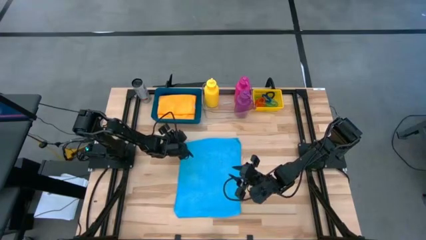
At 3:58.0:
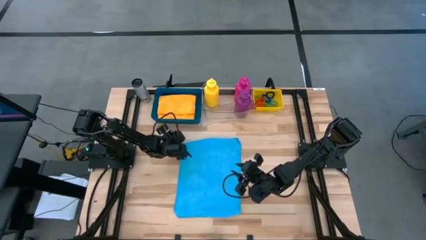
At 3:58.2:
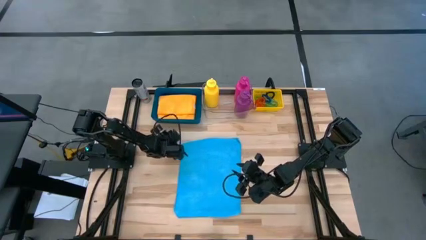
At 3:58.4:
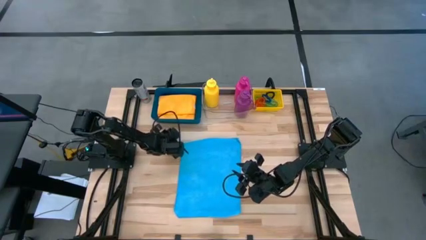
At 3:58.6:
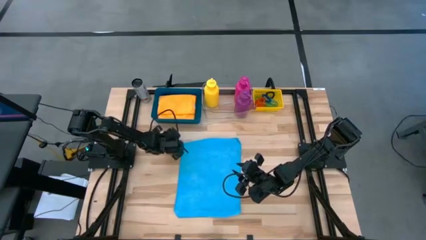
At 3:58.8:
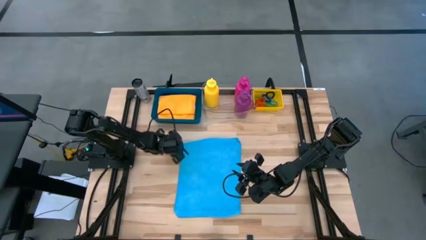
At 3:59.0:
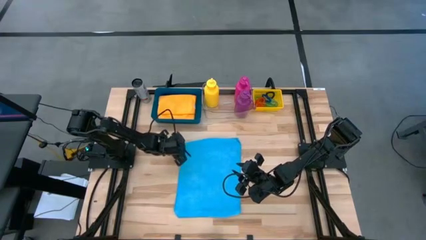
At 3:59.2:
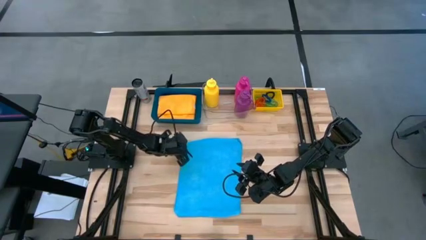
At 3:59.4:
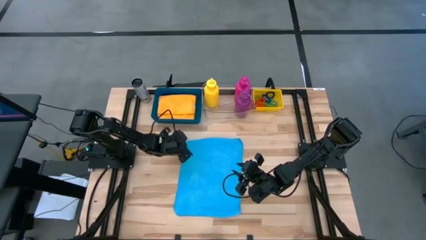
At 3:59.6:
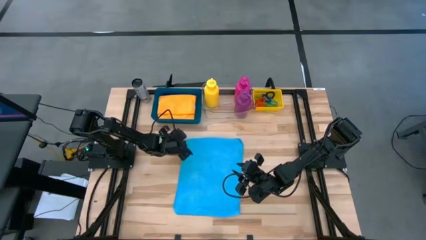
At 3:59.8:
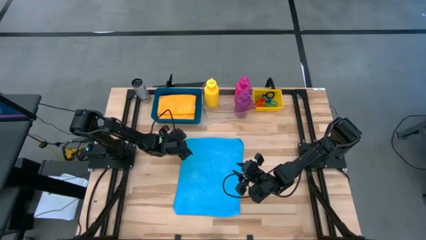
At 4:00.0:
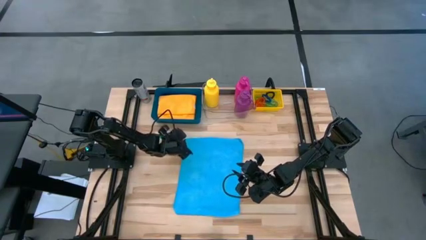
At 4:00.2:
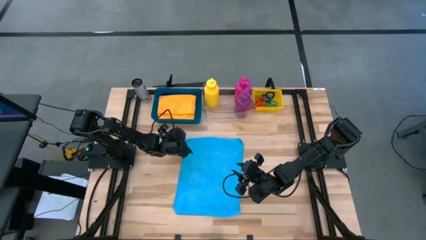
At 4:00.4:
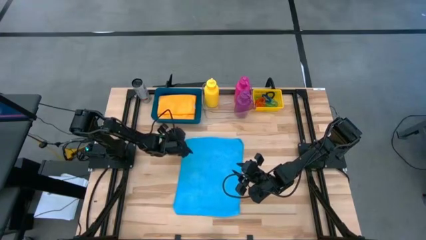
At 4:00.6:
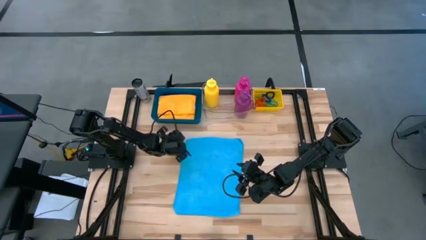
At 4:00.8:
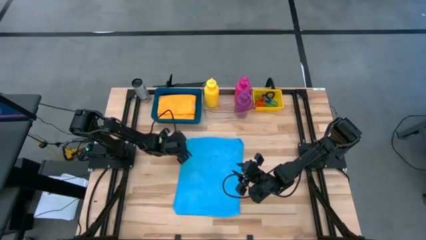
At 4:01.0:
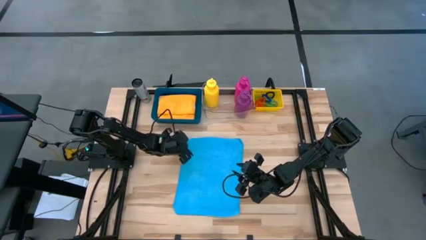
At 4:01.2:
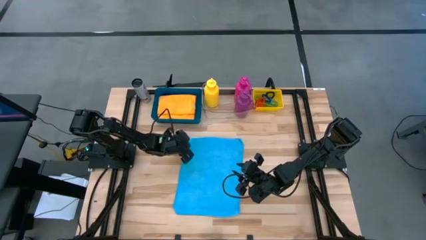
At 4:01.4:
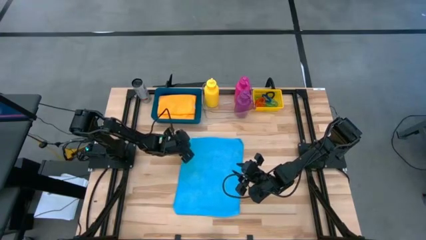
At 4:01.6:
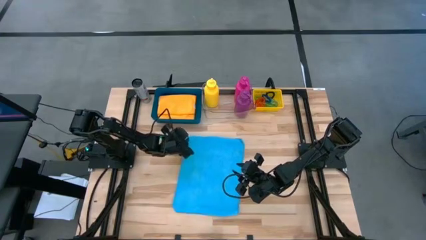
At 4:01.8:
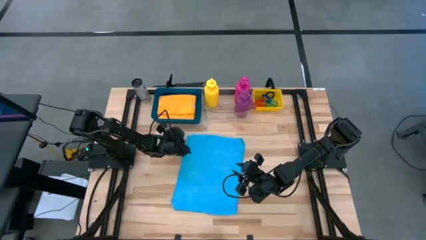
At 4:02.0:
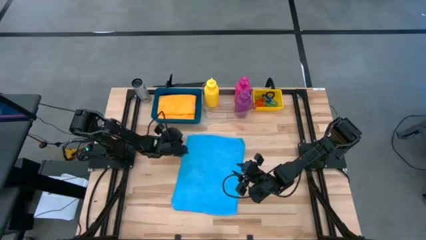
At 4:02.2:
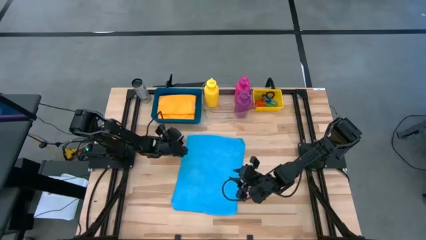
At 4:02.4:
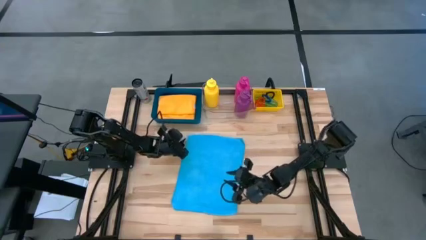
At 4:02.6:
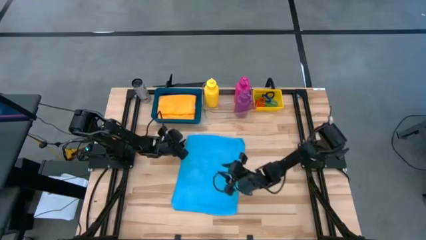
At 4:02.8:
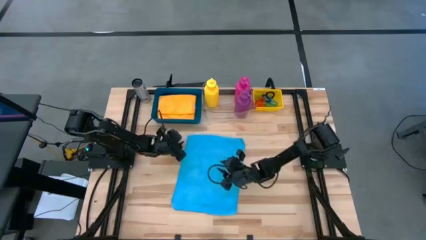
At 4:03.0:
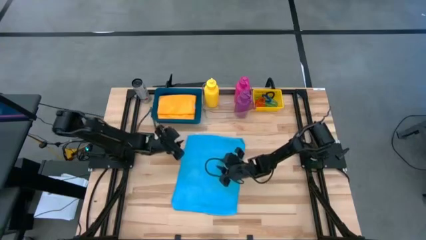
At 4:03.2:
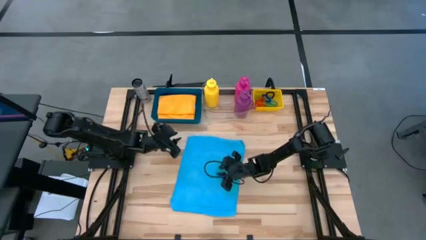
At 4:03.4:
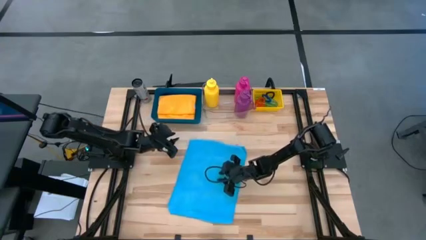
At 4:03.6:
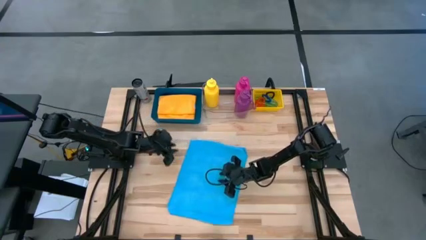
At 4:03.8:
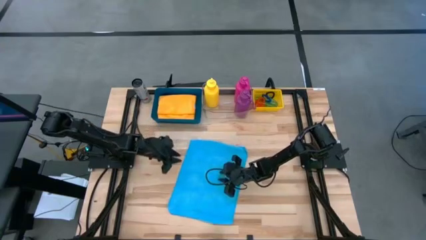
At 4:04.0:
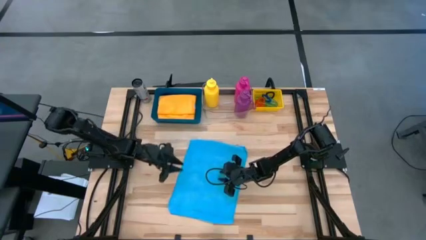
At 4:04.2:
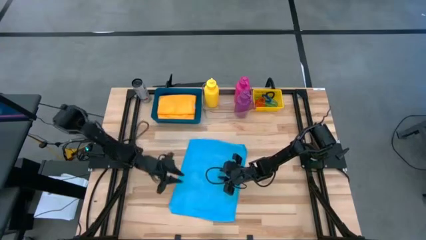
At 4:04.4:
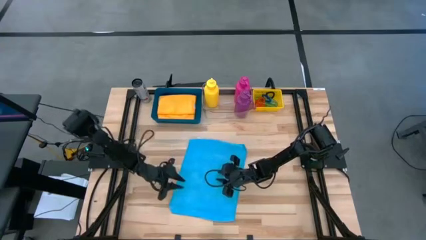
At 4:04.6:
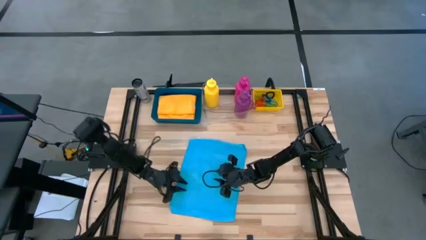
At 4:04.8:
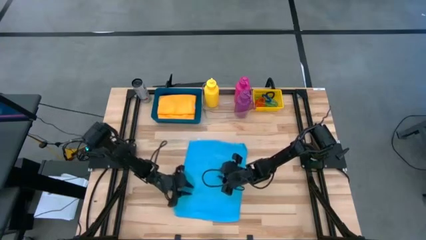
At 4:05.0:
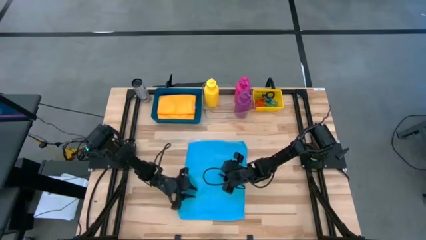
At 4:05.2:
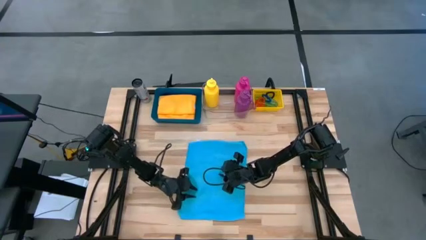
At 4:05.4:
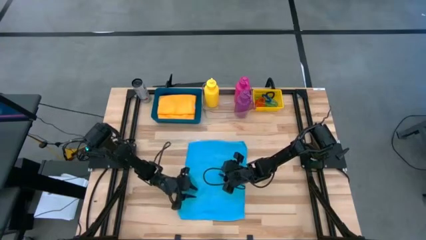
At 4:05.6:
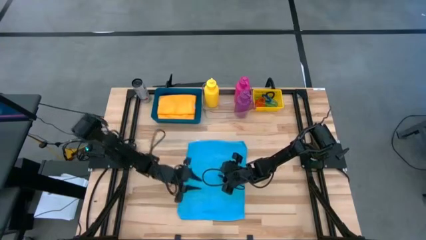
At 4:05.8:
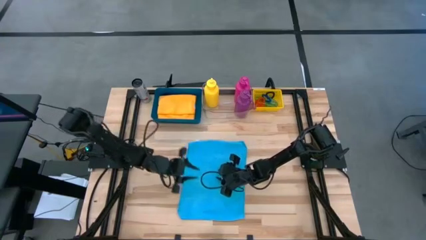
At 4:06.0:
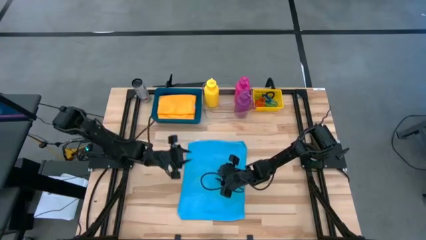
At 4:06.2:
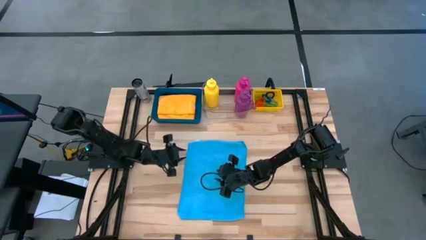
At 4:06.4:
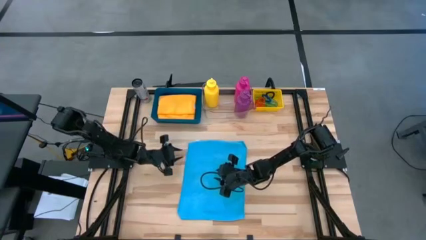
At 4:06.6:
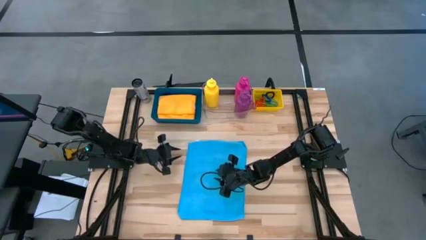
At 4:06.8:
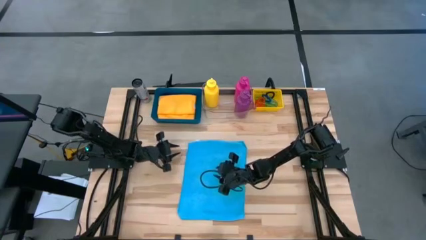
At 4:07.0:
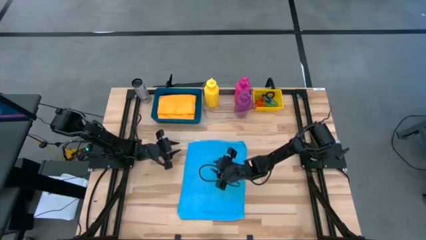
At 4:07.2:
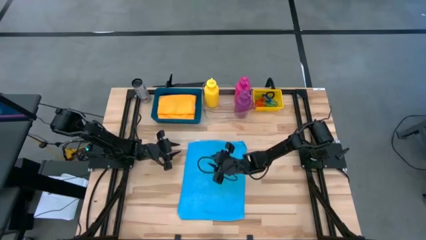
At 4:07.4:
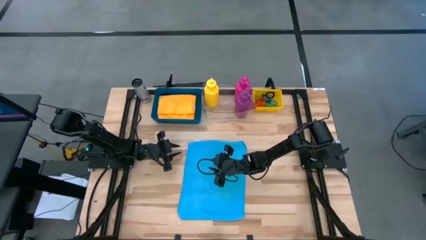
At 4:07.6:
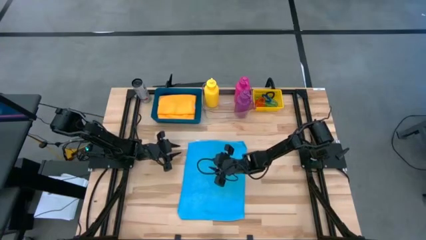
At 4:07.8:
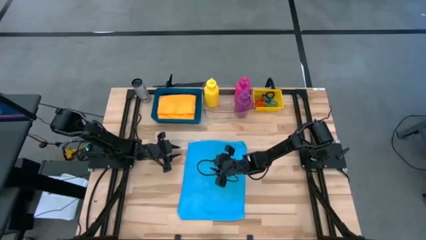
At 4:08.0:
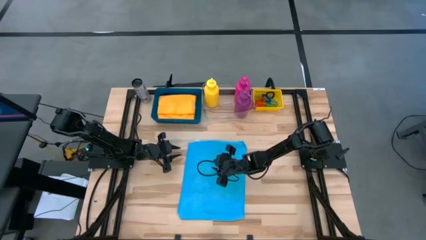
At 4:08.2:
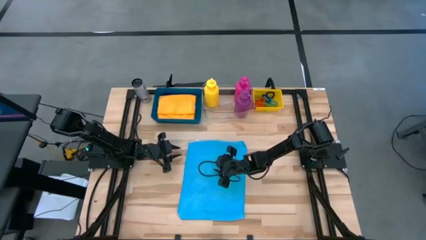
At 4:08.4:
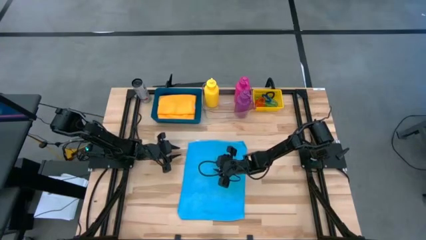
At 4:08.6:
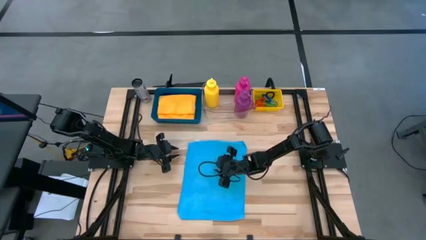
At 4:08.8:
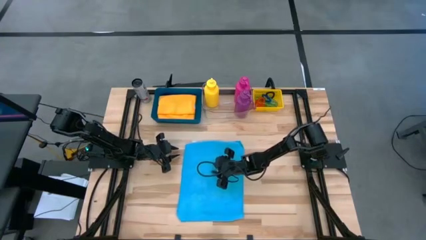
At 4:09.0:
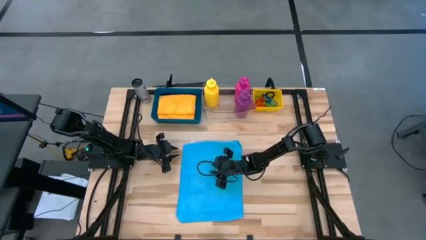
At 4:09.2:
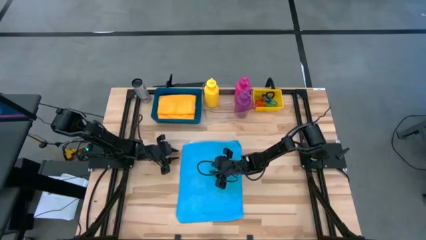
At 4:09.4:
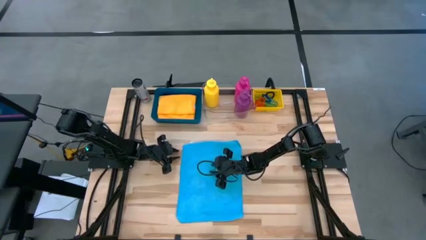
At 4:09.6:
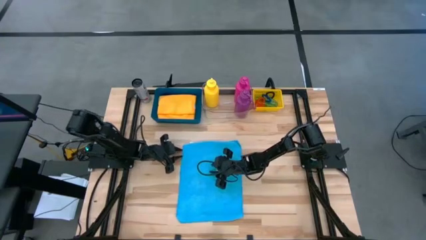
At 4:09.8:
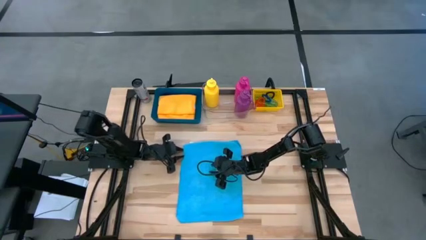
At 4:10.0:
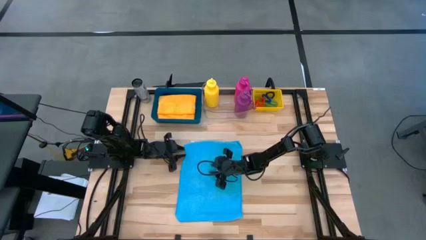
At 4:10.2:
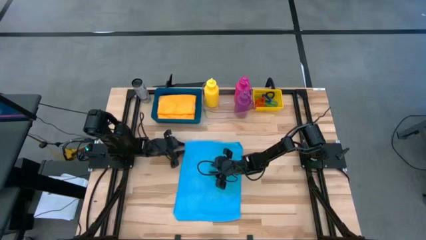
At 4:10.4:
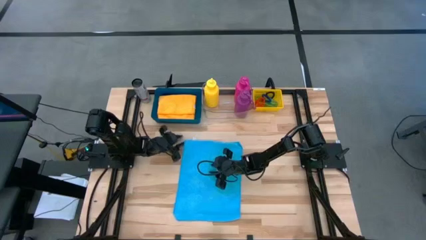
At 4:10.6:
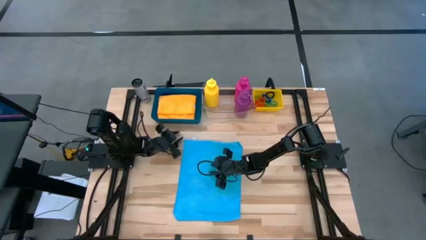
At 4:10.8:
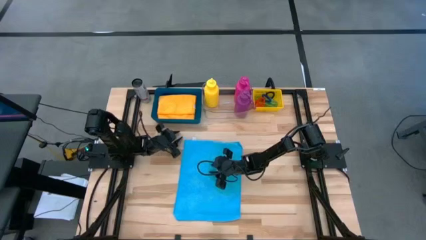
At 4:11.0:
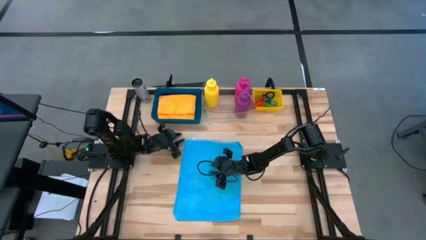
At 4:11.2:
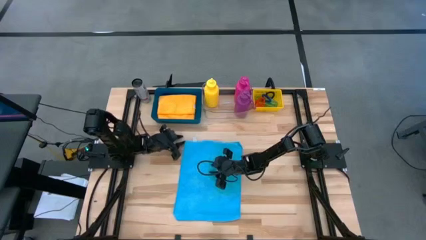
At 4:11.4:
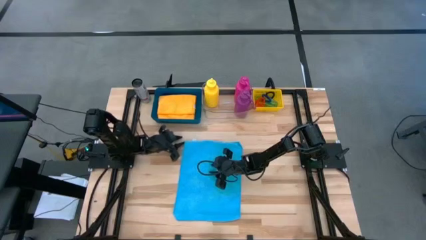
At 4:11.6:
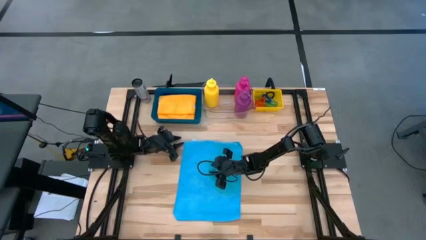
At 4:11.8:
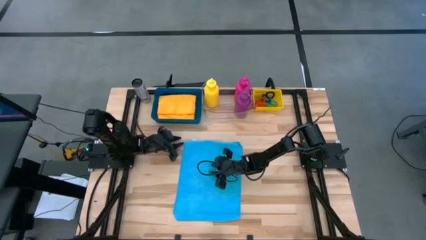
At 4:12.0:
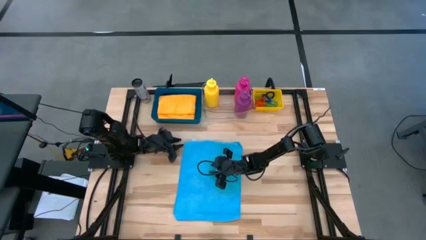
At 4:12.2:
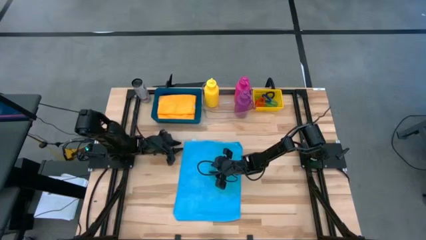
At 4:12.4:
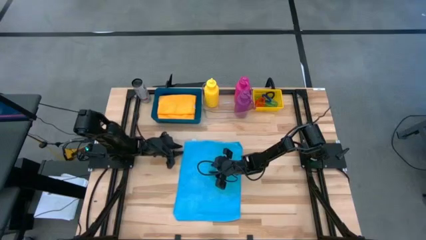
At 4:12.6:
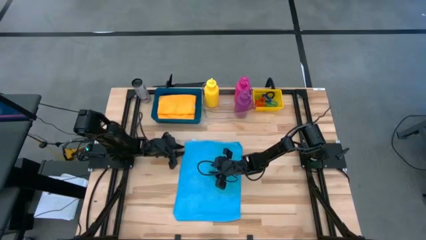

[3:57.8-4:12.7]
Task: Pick & Place Sports Items
Fold the blue towel
